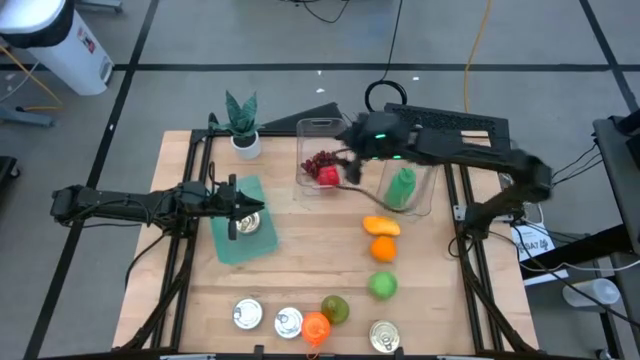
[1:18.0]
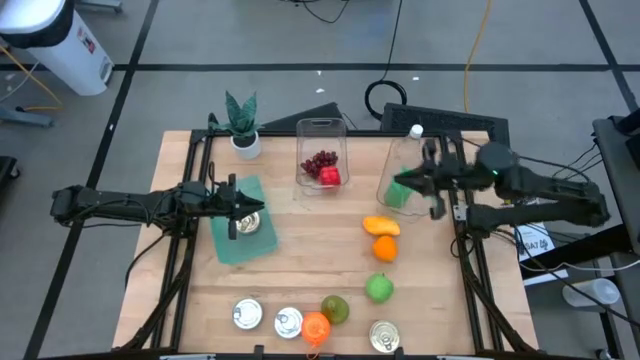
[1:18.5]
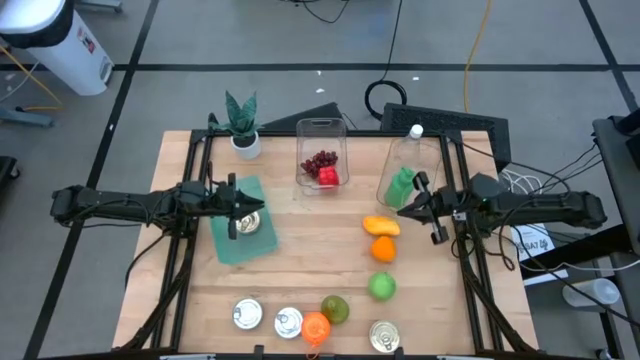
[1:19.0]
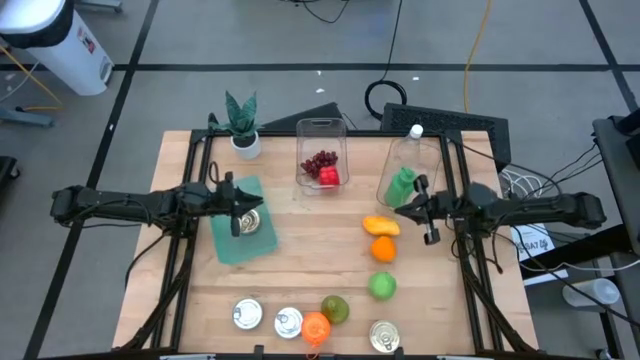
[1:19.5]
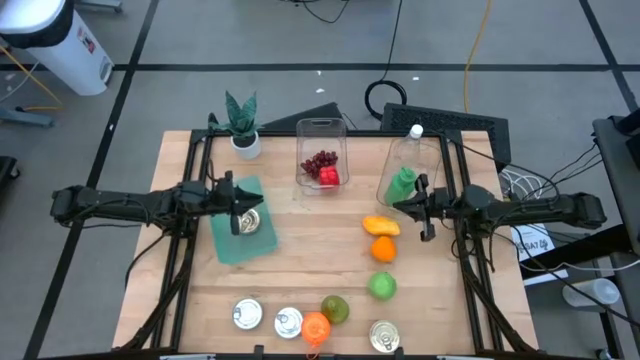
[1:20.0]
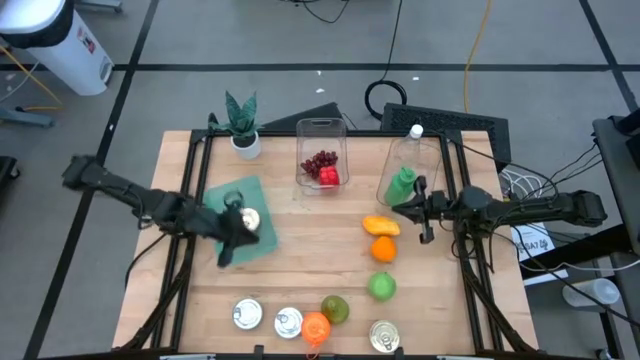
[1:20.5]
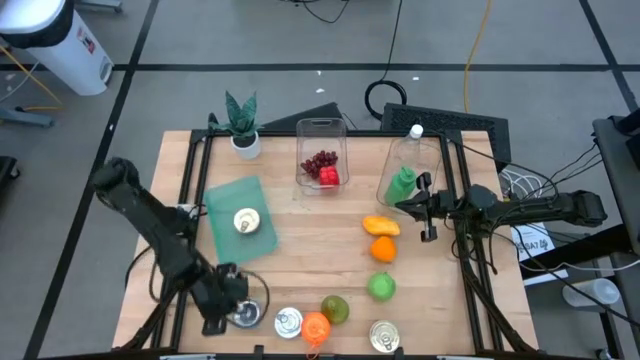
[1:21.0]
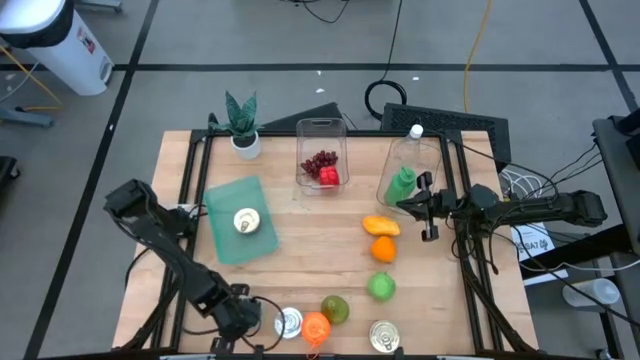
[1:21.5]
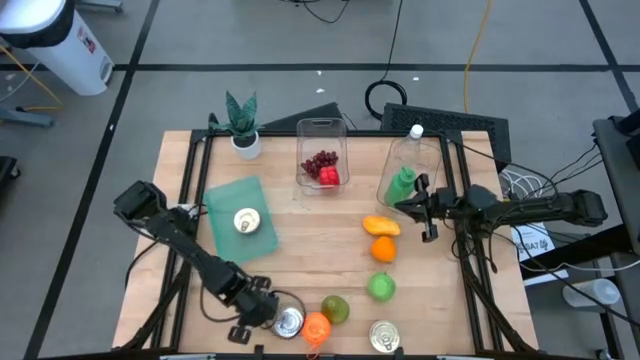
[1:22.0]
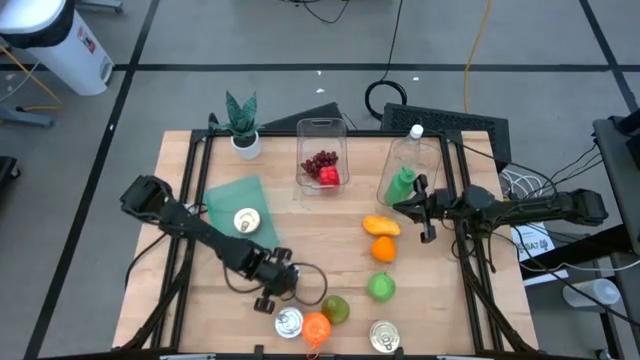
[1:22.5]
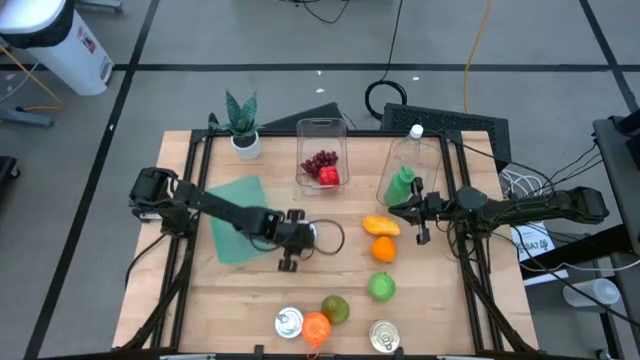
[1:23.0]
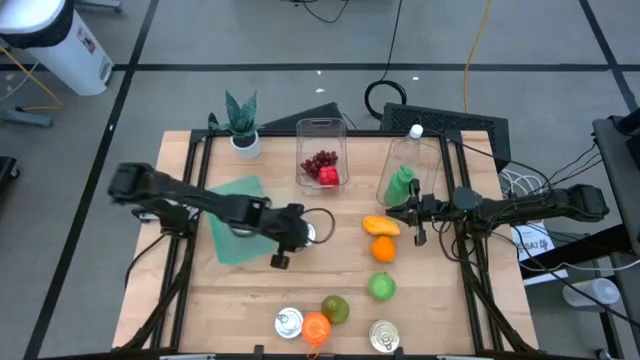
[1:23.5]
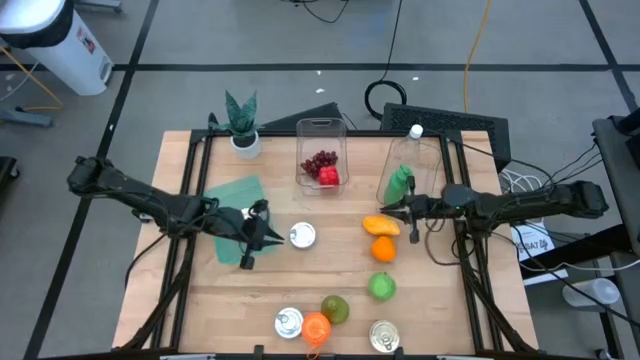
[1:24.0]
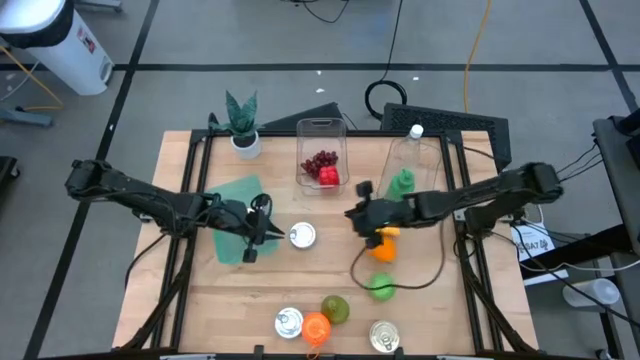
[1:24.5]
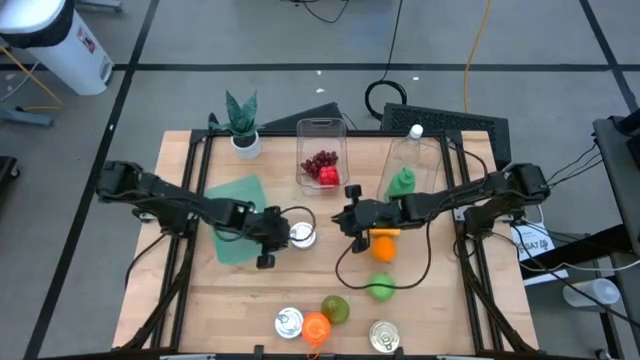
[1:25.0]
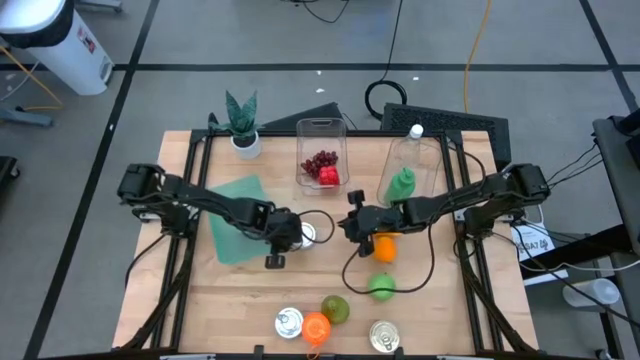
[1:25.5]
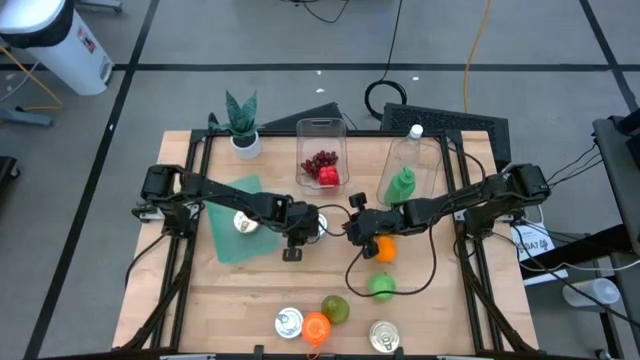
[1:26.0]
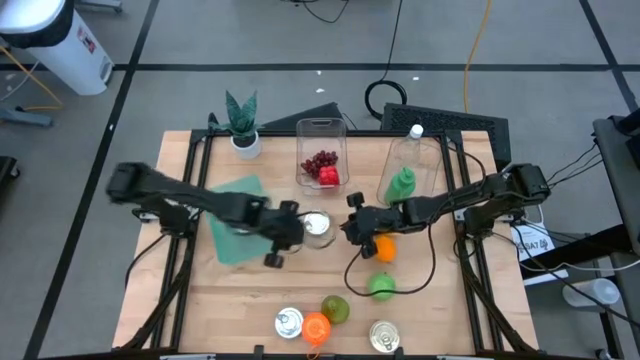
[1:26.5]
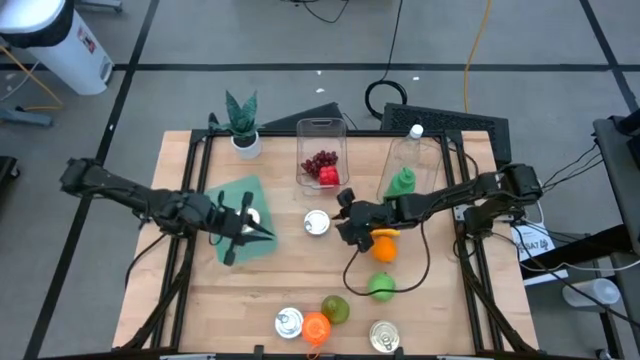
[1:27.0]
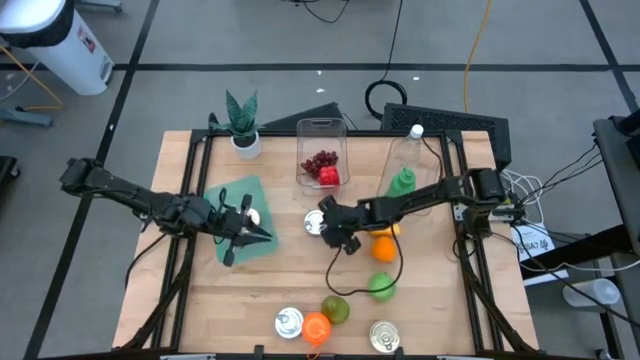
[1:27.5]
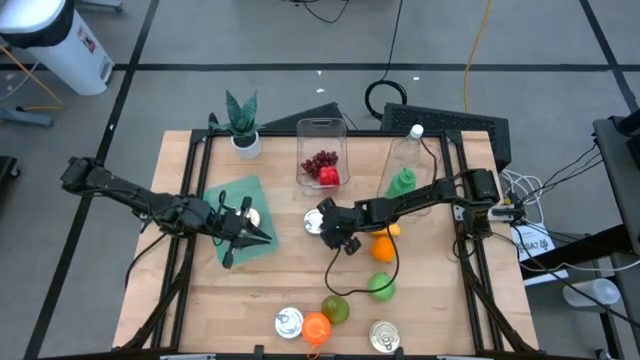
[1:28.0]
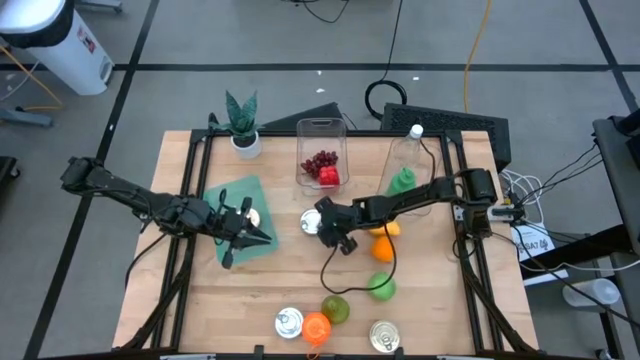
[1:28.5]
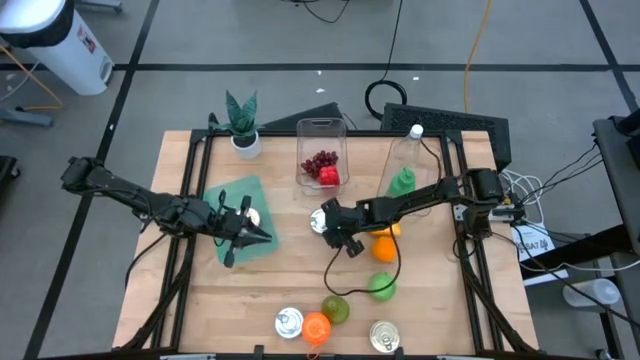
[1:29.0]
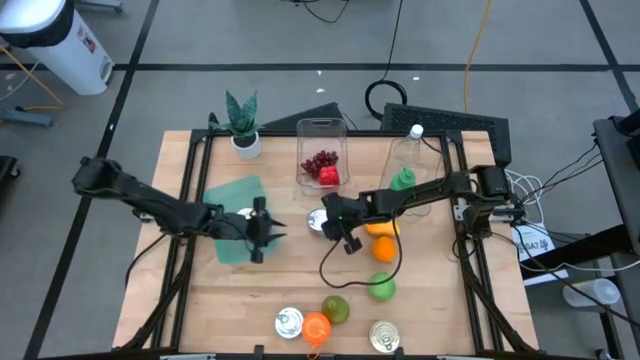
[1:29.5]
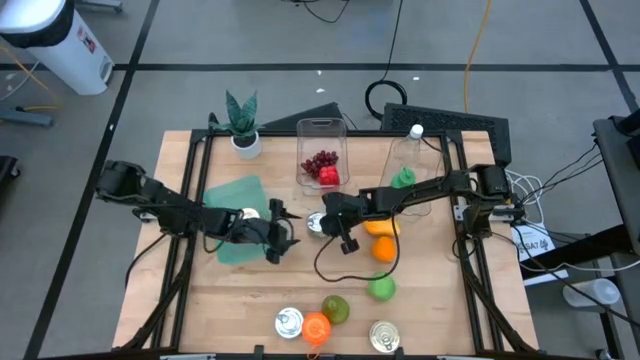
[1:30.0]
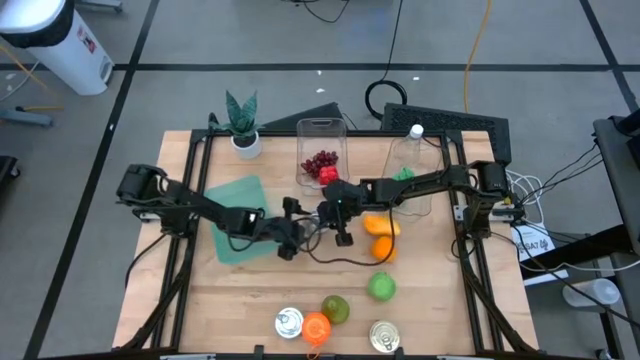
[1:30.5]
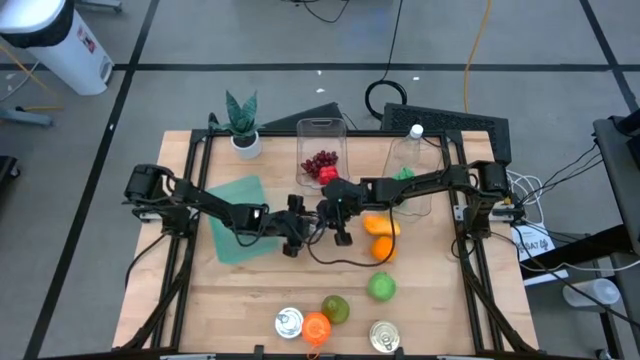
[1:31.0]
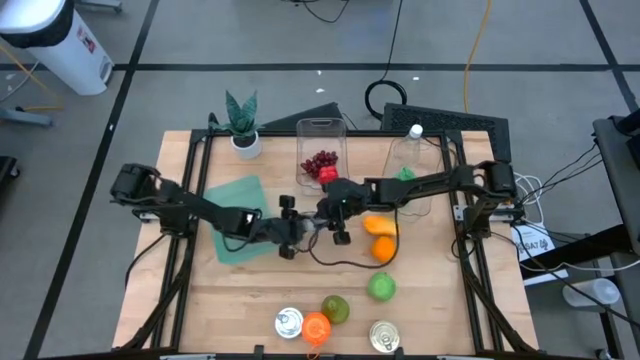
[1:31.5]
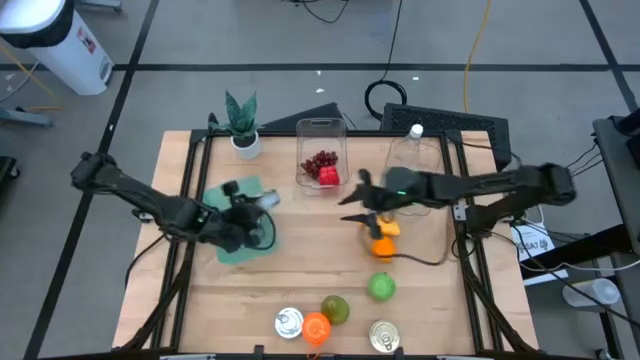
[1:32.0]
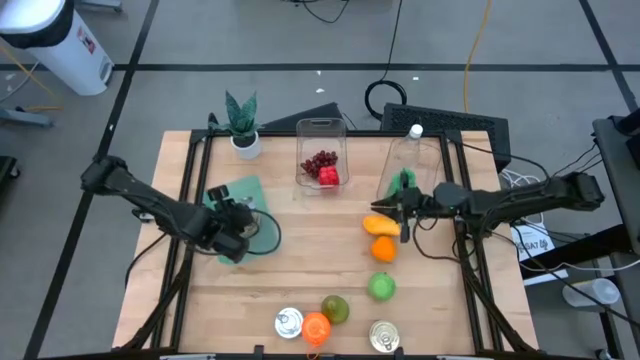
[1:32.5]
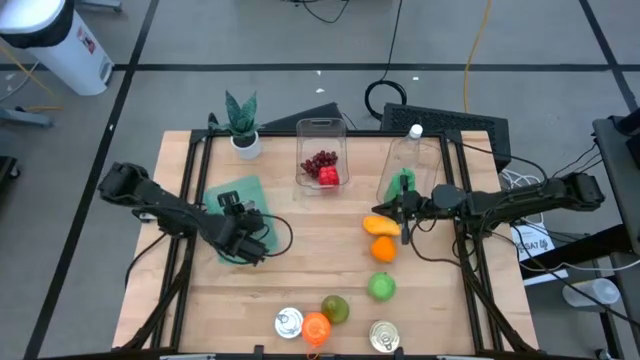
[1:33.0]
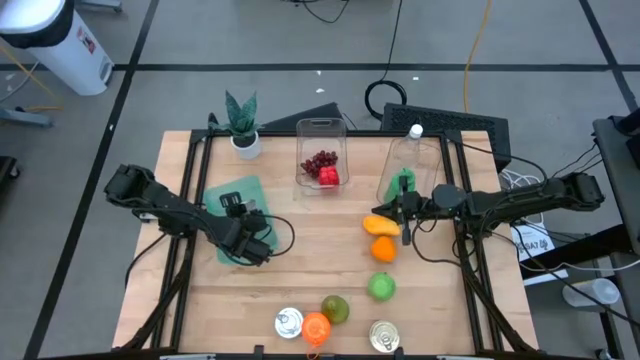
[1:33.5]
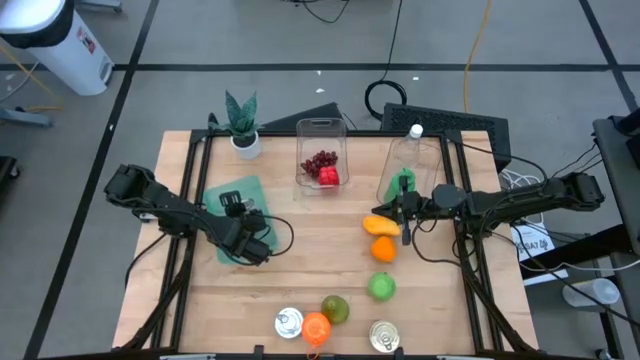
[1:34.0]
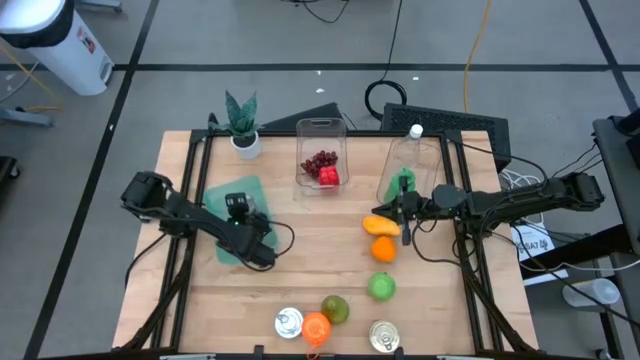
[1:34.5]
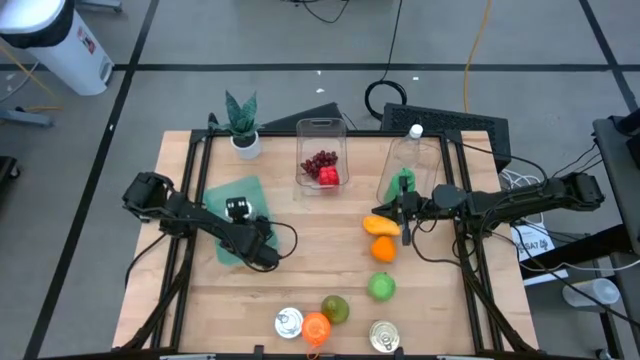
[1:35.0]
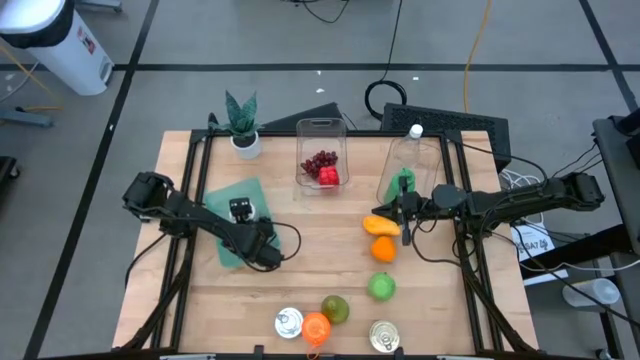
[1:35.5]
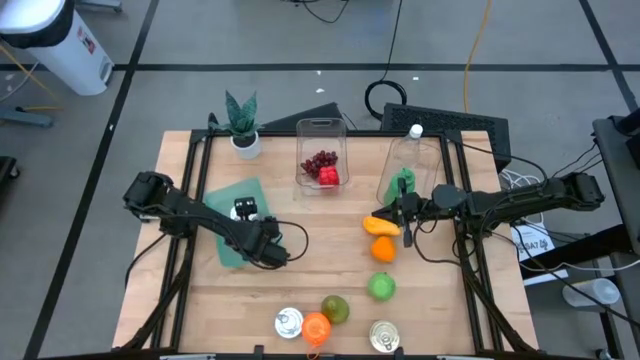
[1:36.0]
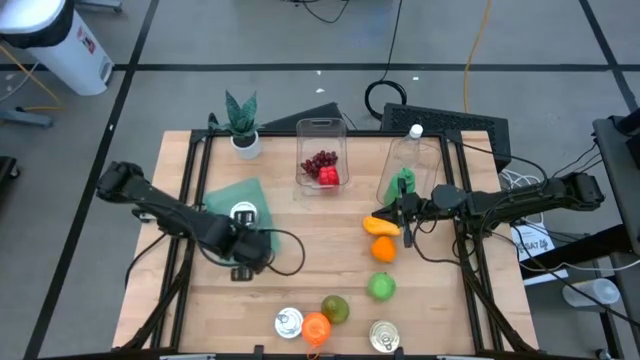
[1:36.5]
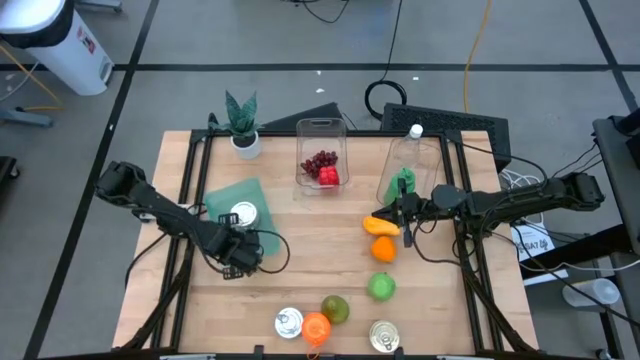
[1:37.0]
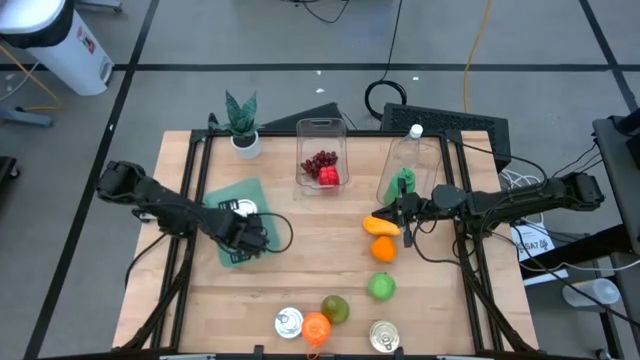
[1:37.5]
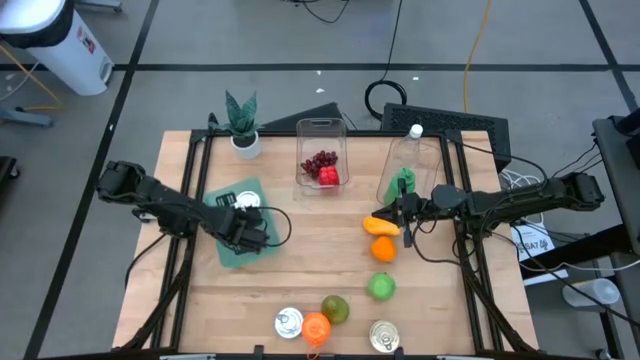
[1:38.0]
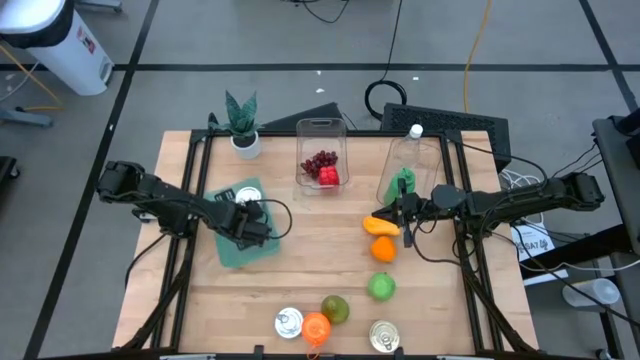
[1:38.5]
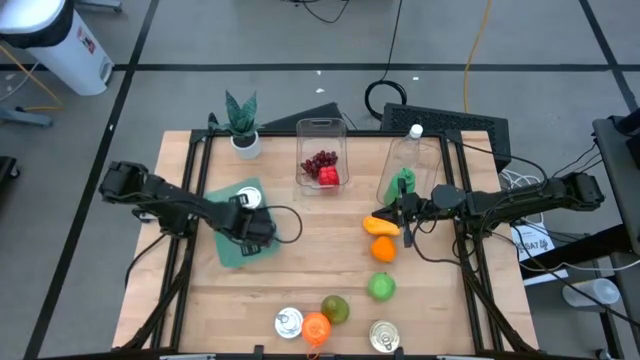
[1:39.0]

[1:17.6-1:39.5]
Task: Pick & Place Food Item
Stack the left green tuna can on top of the blue and pink tuna can in the blue bin
